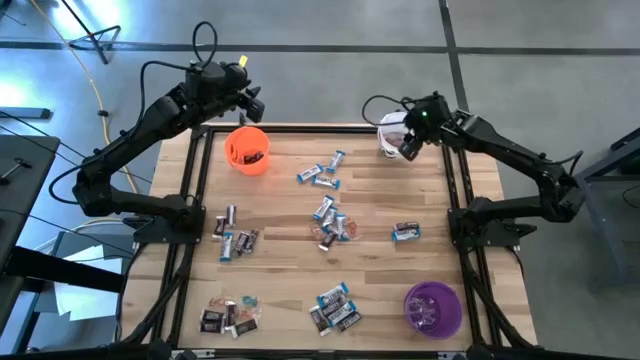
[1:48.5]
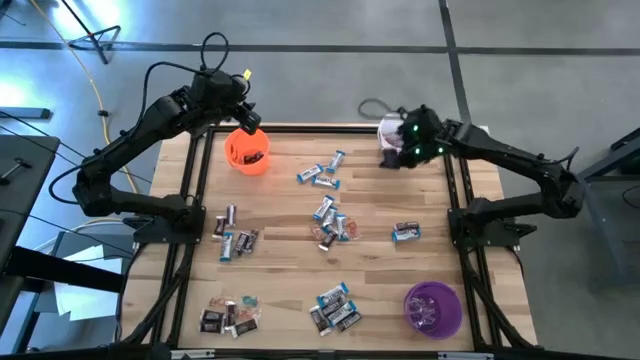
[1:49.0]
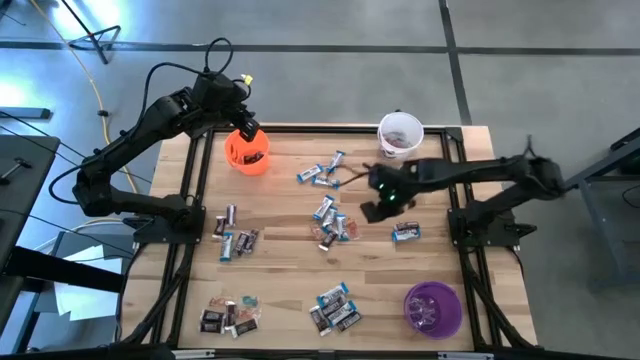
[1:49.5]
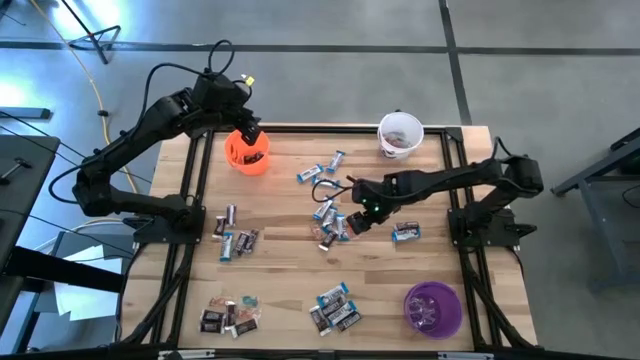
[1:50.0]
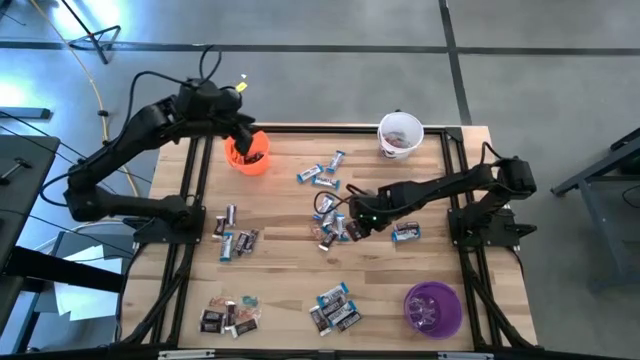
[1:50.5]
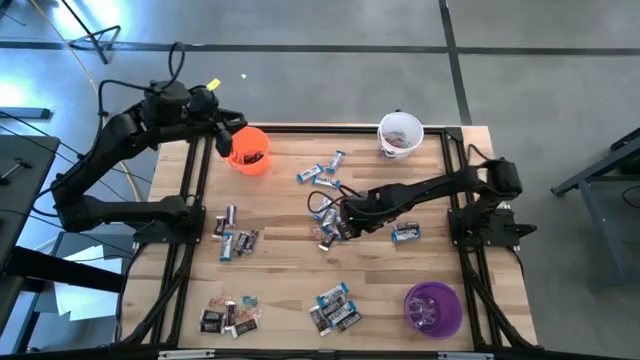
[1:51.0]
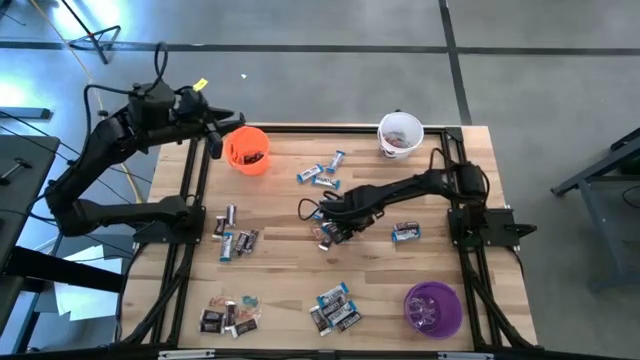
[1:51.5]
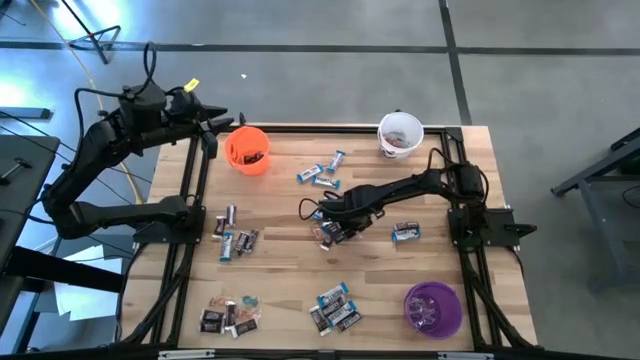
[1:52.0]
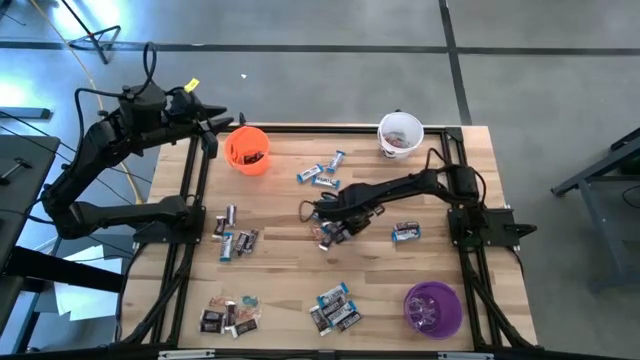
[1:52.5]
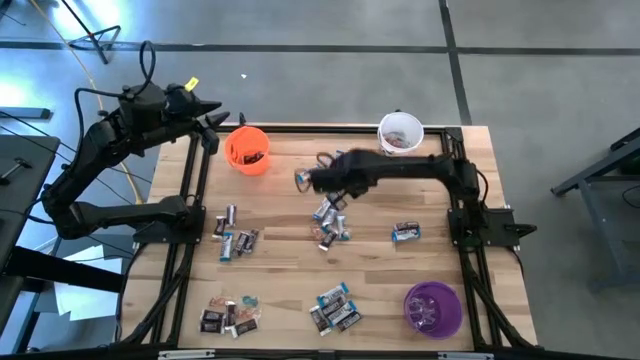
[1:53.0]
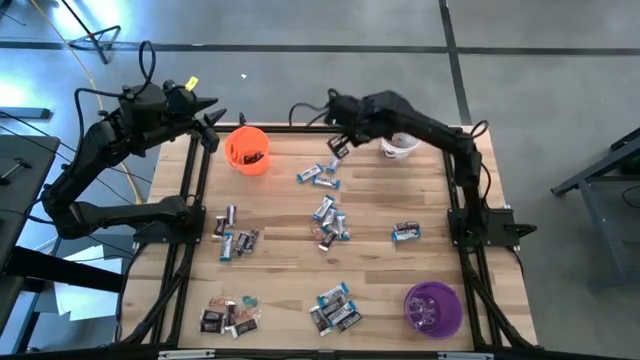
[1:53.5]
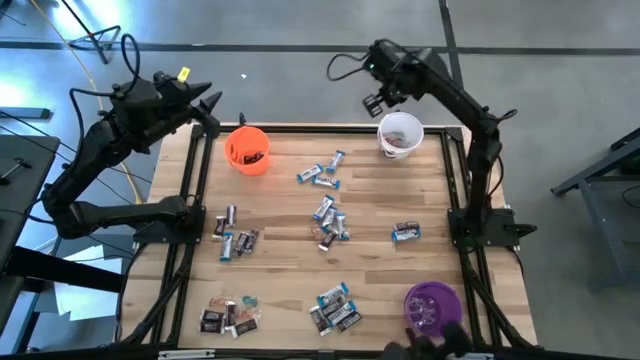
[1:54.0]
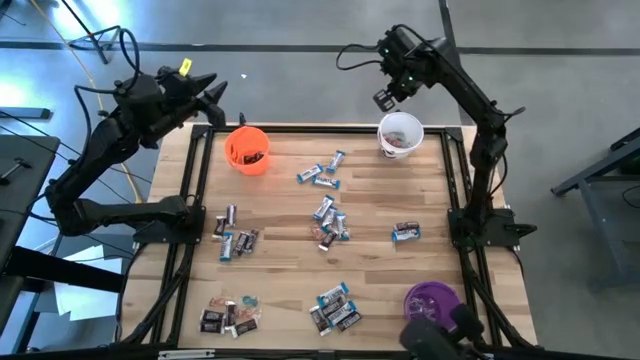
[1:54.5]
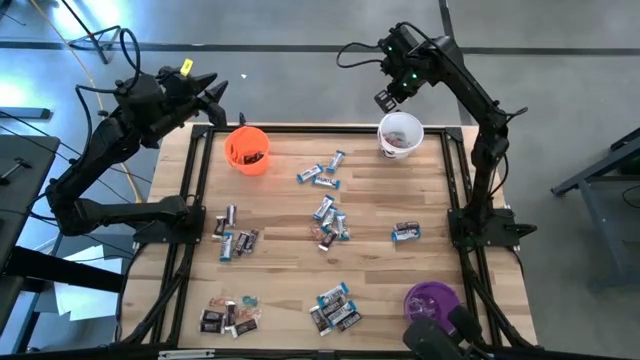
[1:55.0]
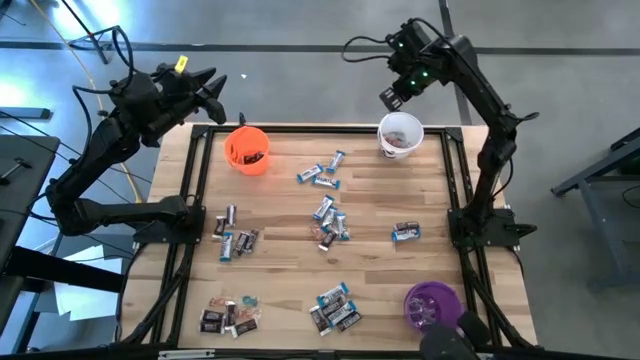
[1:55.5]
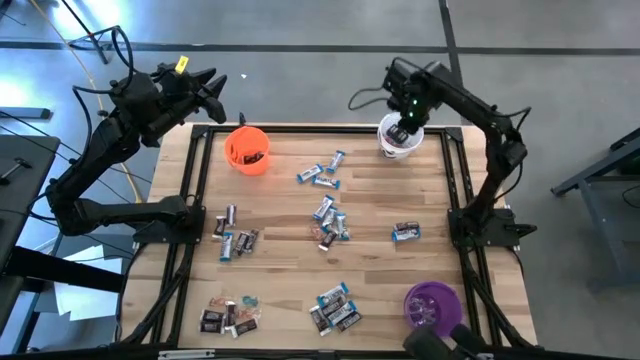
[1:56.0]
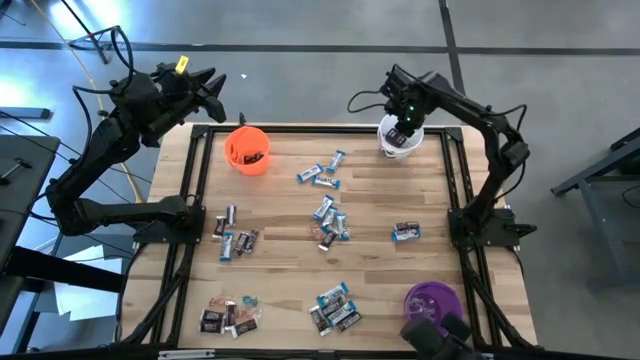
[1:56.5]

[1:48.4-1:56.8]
Task: Sort candy
Put the red gummy into the white bucket

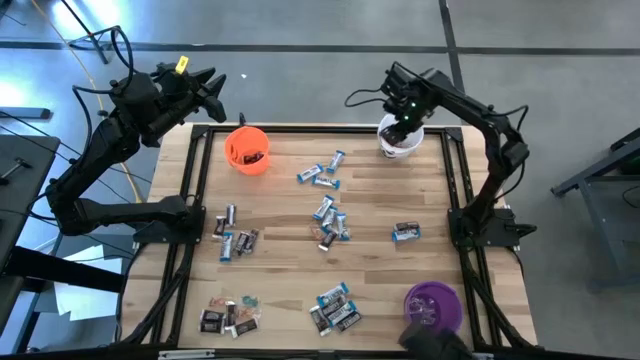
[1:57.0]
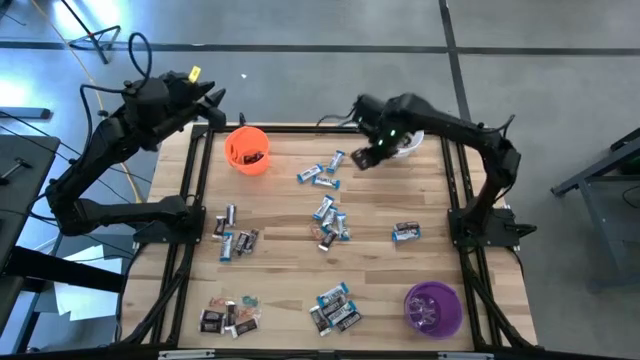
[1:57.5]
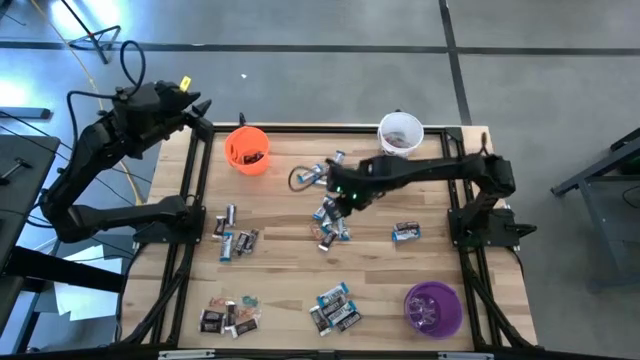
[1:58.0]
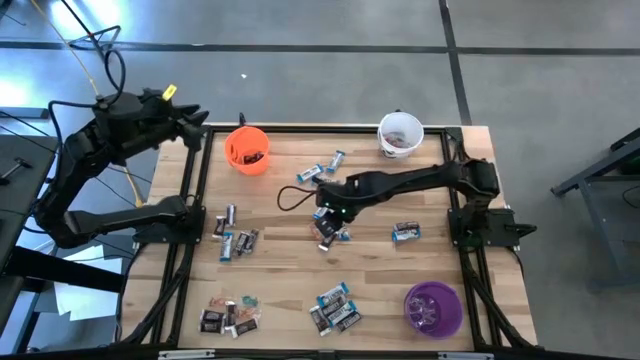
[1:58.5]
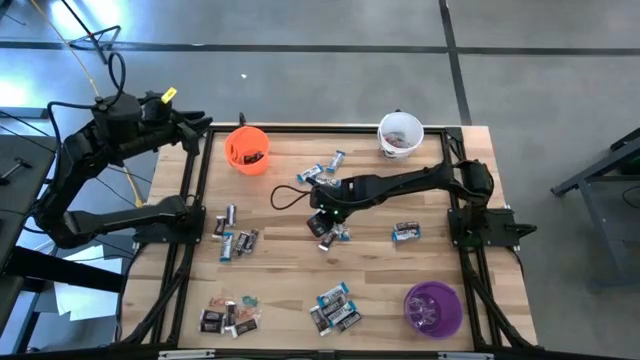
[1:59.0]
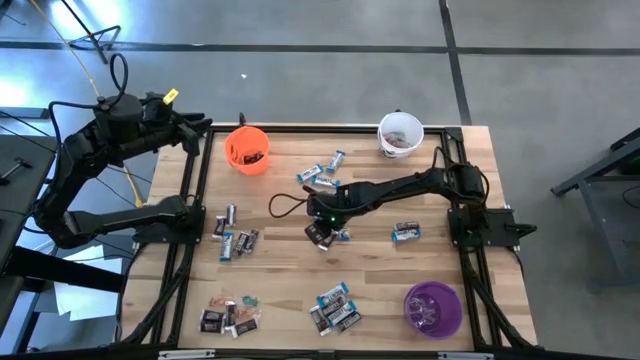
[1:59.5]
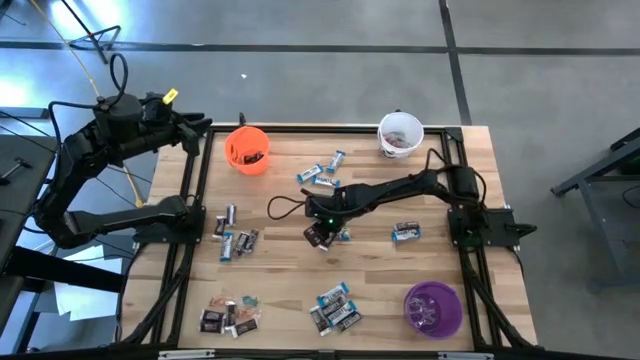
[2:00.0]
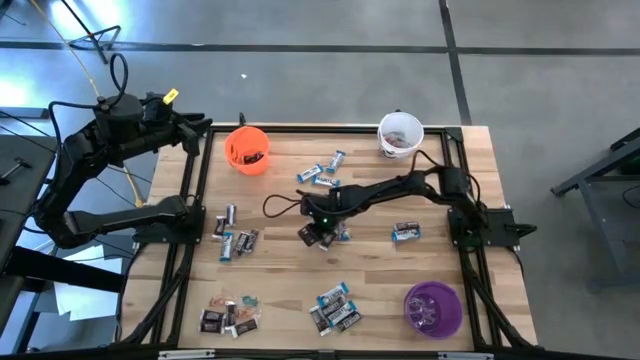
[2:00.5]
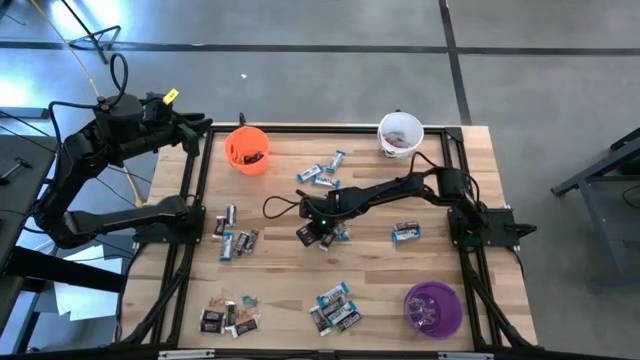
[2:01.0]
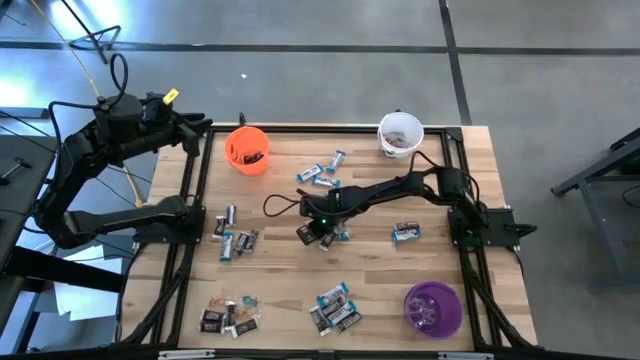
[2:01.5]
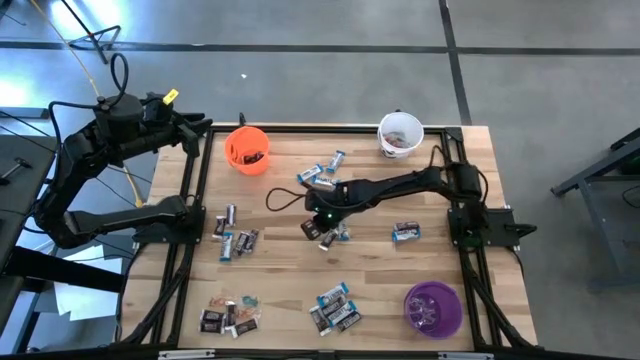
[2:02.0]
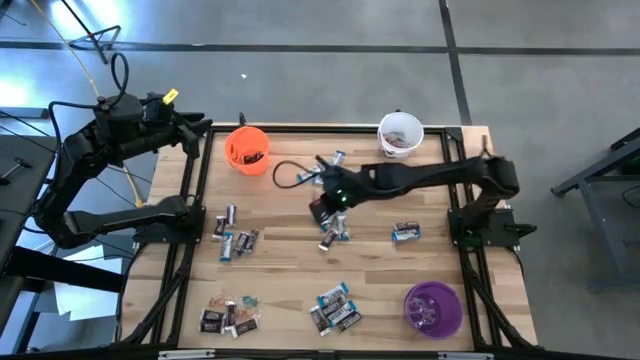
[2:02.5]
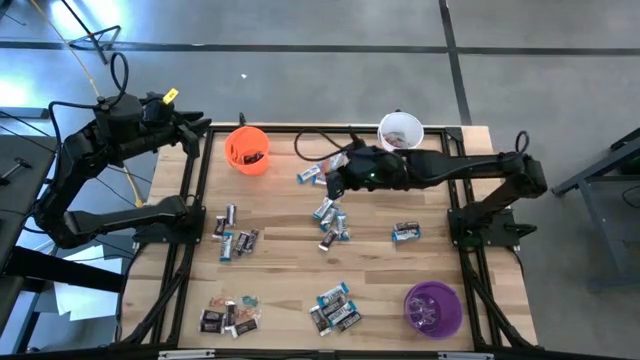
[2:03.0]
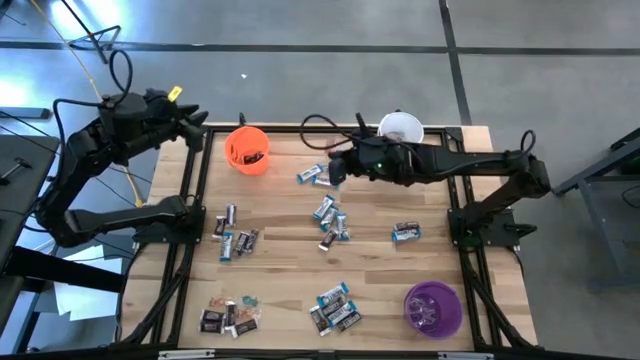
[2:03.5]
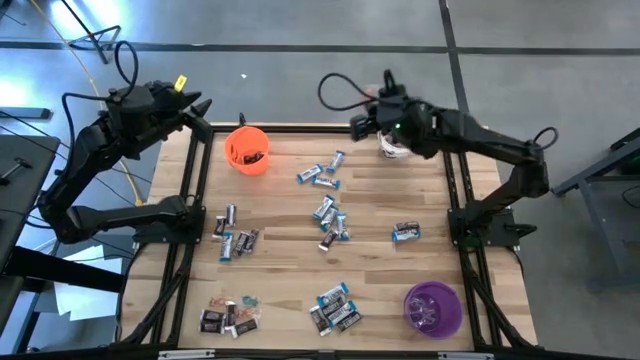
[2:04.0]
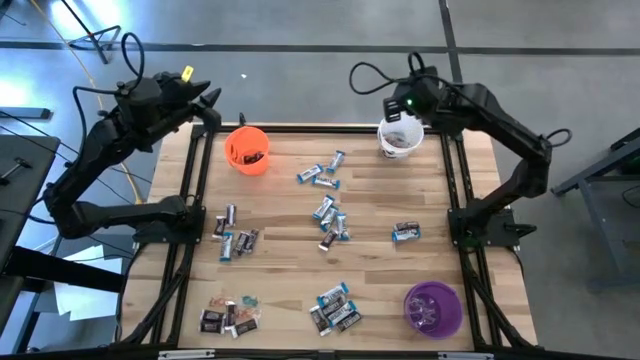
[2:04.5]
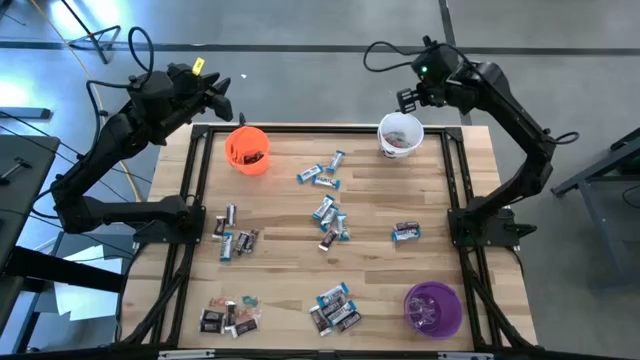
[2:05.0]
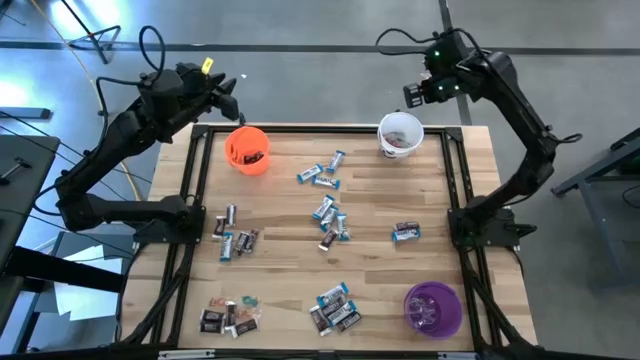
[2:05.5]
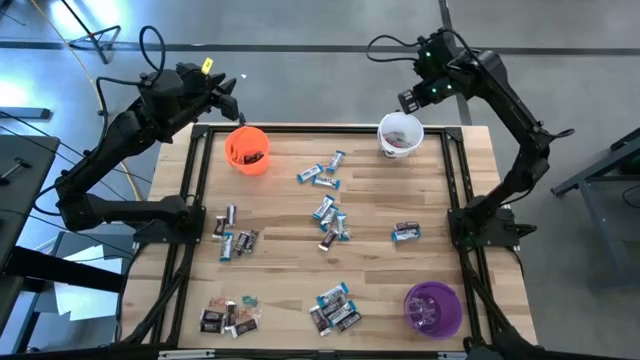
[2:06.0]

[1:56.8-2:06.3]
Put the orange gummy into the white bucket

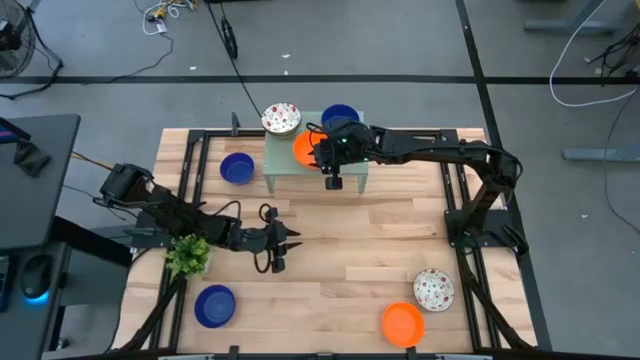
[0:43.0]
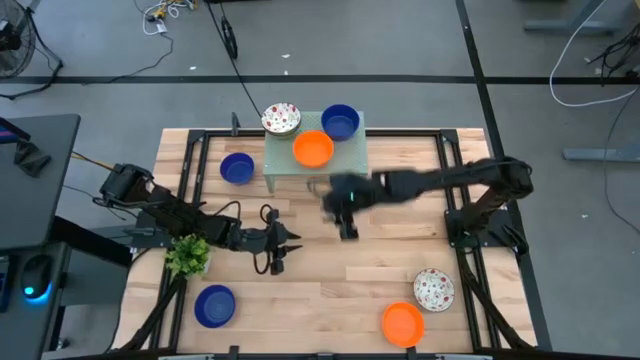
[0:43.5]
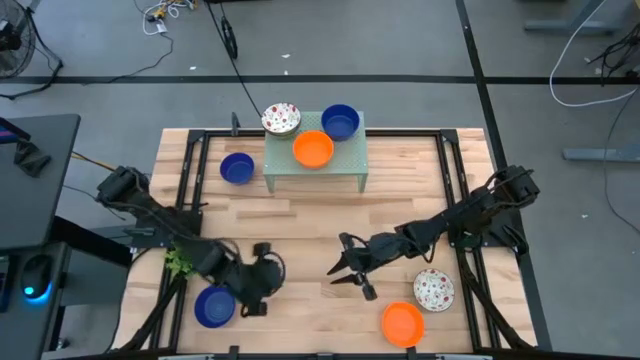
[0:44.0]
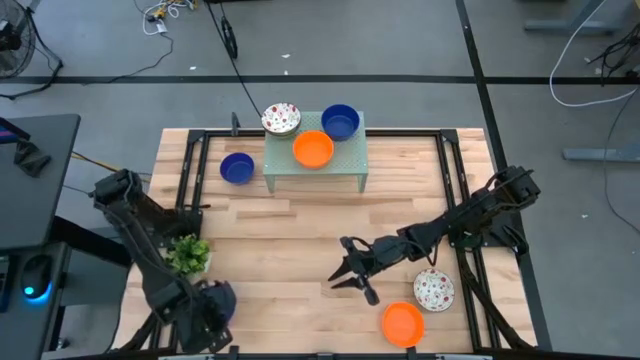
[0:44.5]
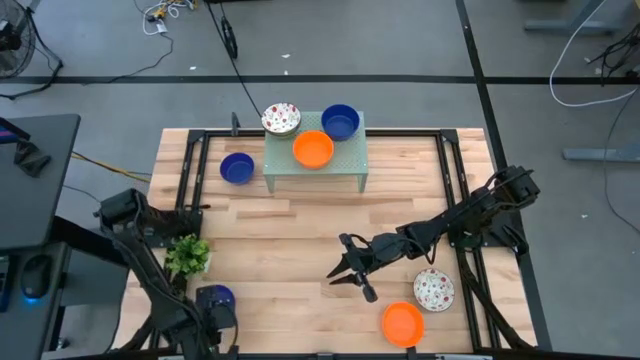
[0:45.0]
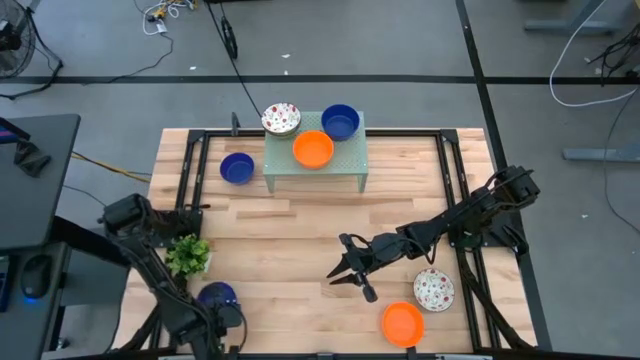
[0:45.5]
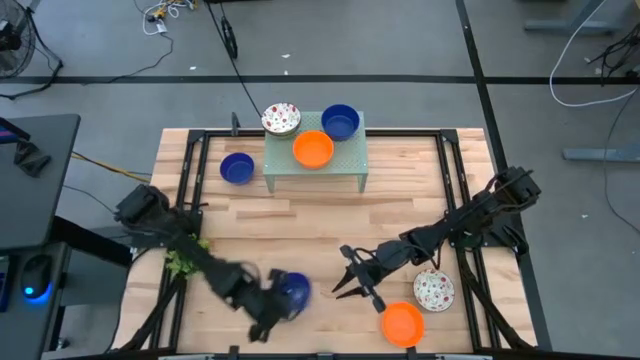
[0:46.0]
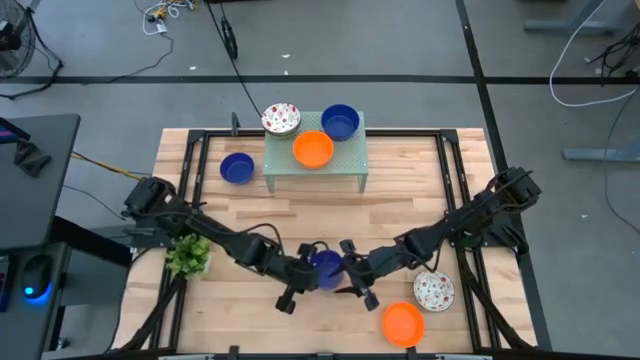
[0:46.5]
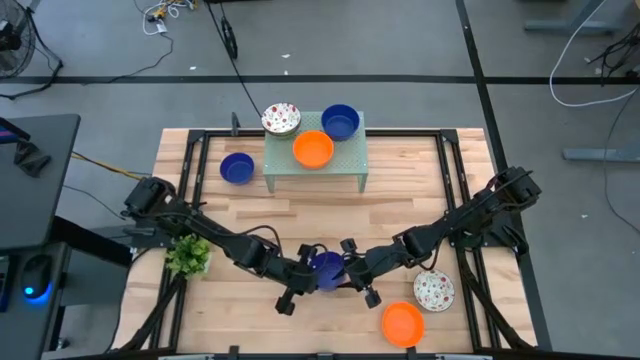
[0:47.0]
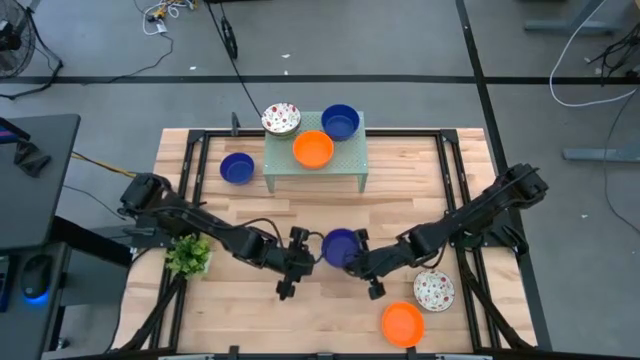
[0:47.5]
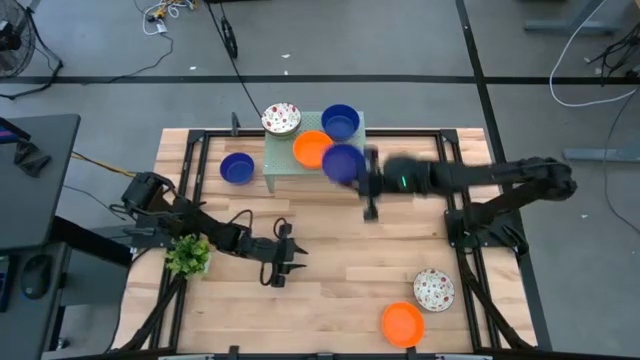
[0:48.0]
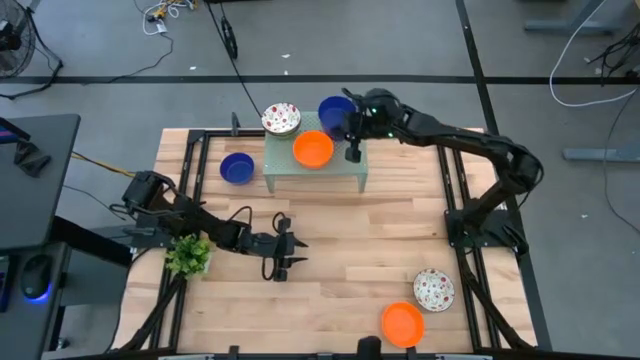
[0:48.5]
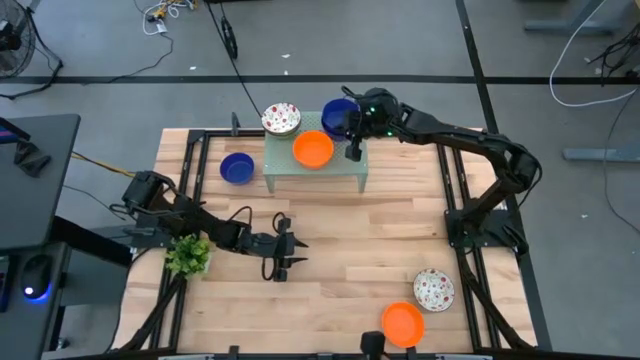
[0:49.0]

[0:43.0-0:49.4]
Task: Pick & Place Mini bowls
Stack the blue bowl on the blue bowls on the shelf
